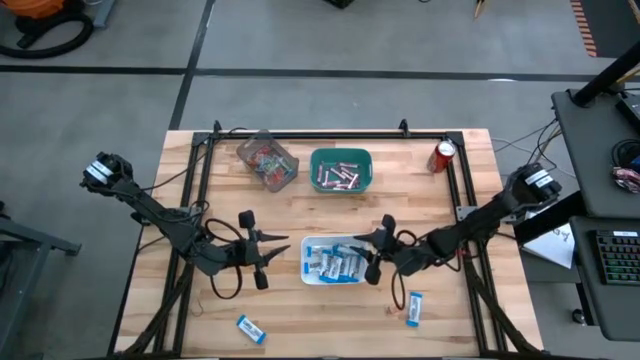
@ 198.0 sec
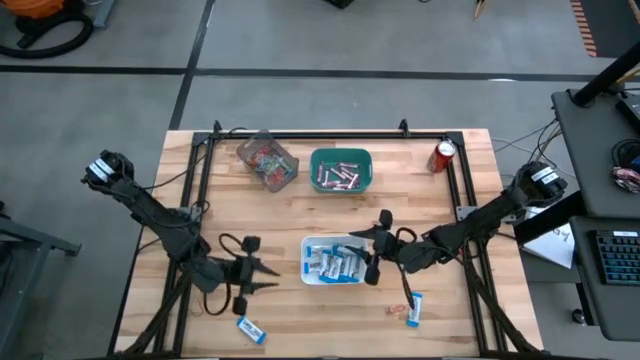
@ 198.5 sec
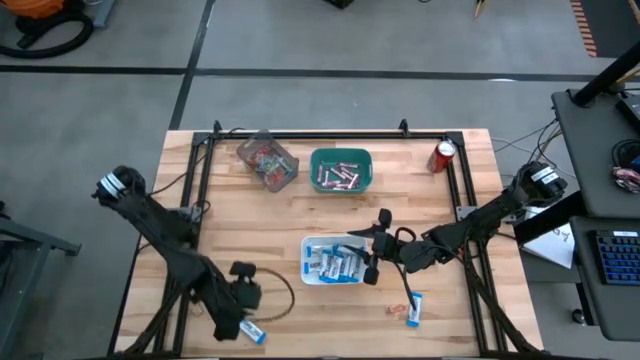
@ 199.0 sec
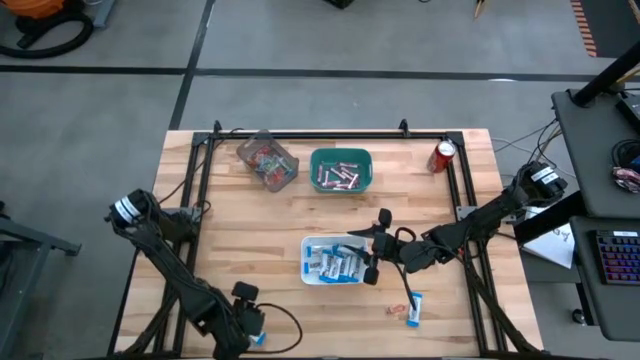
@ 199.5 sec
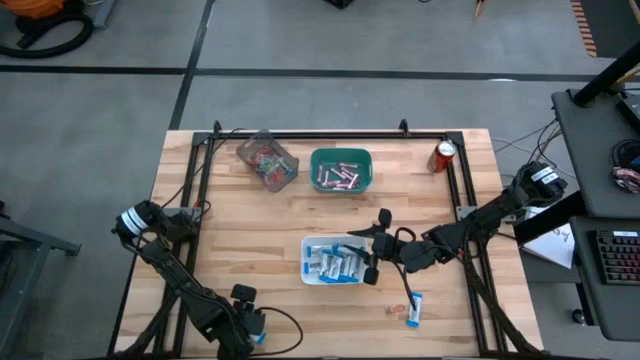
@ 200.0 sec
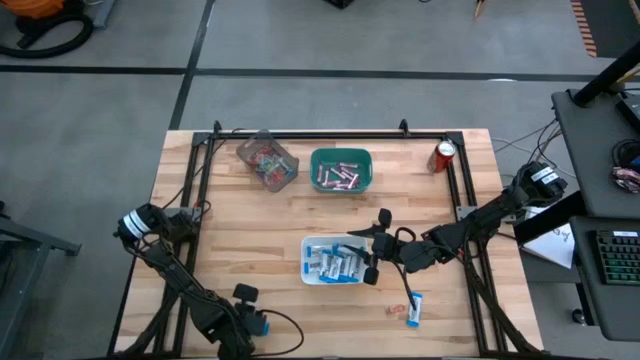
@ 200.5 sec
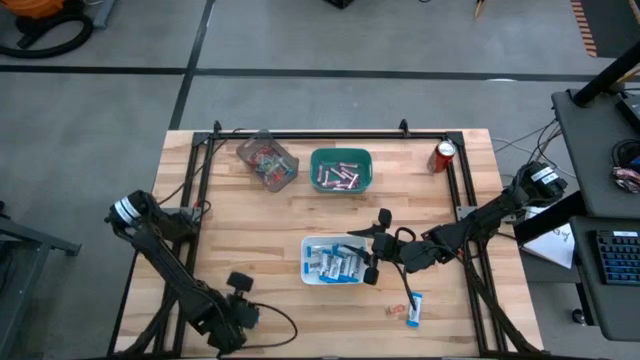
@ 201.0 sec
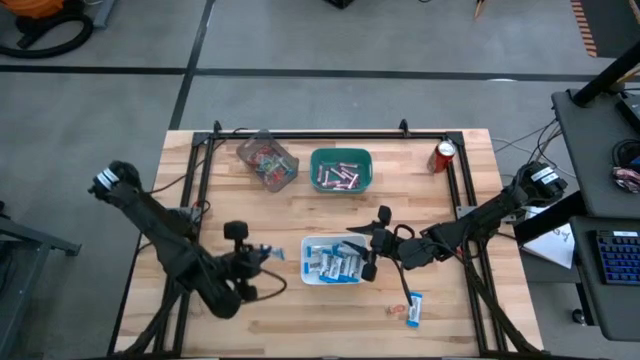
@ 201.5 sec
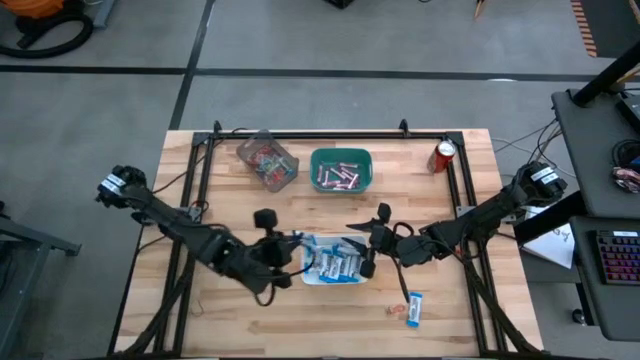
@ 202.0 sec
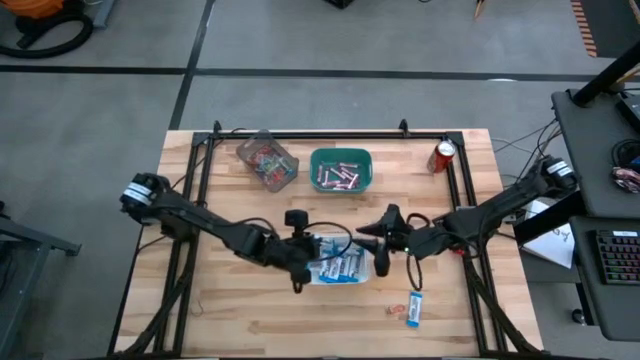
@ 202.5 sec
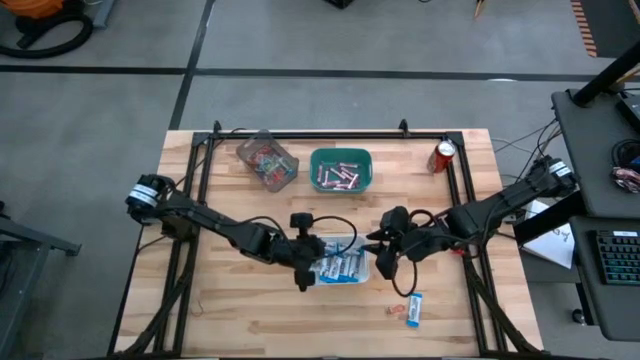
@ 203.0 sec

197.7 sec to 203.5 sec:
Task: Sort candy
Put the white chocolate bar into the white bin

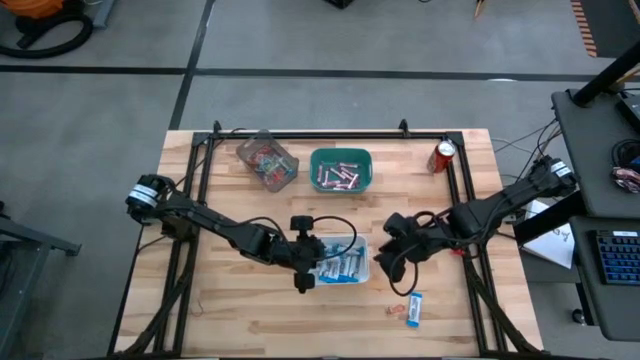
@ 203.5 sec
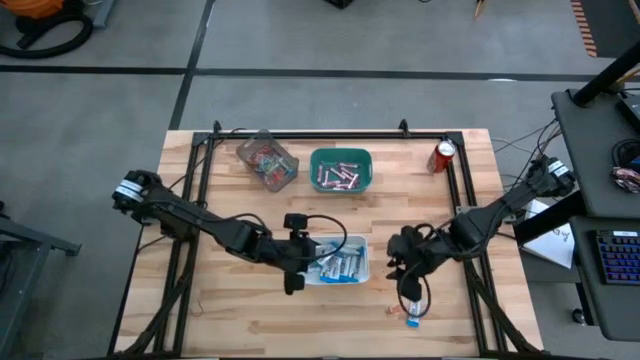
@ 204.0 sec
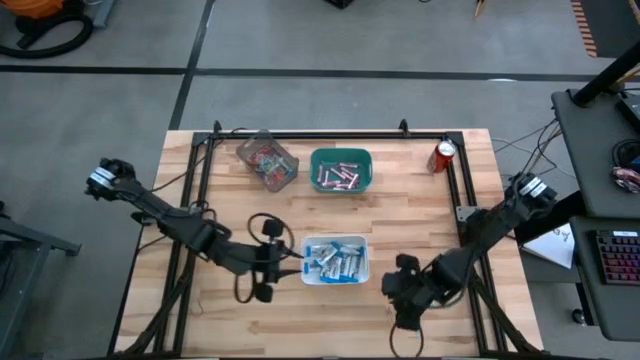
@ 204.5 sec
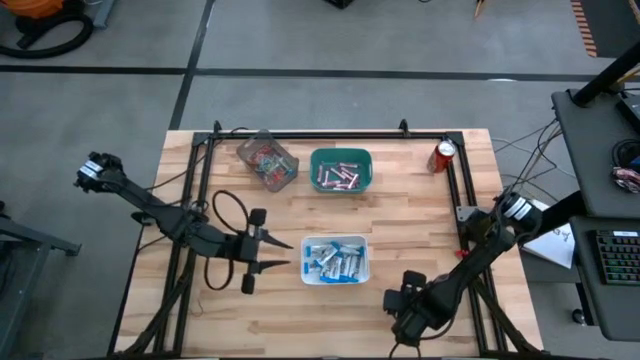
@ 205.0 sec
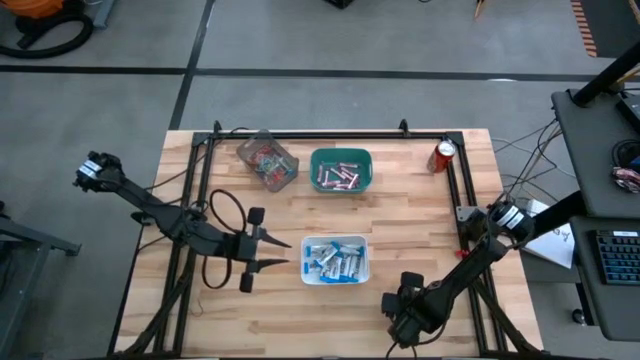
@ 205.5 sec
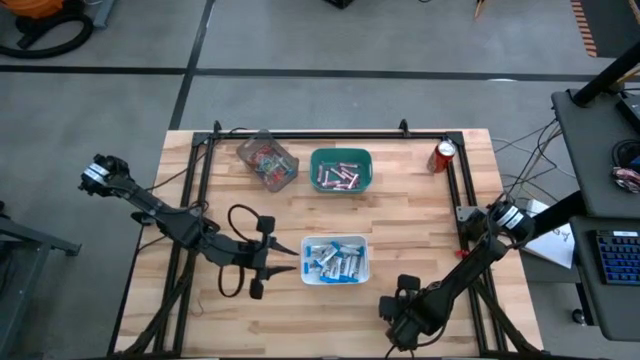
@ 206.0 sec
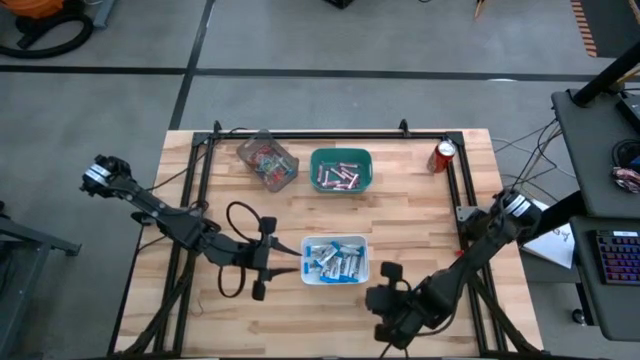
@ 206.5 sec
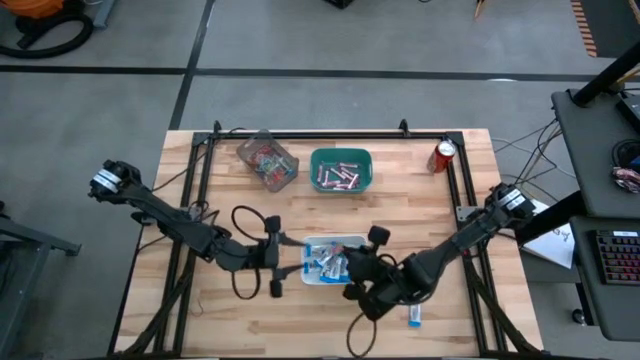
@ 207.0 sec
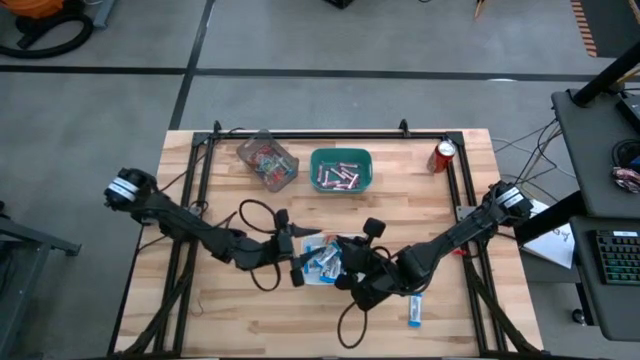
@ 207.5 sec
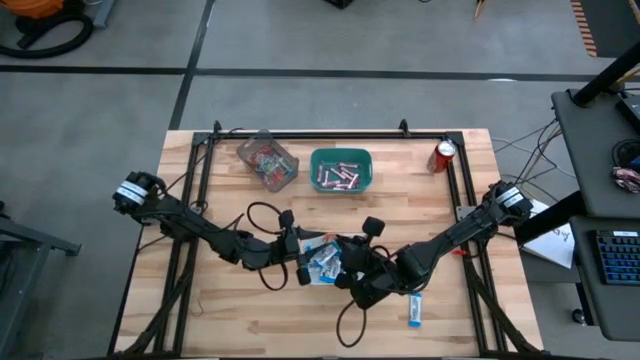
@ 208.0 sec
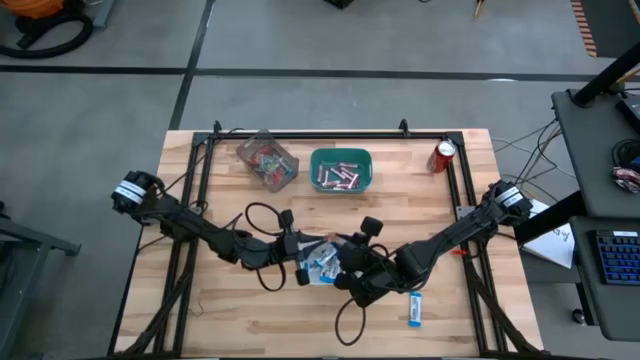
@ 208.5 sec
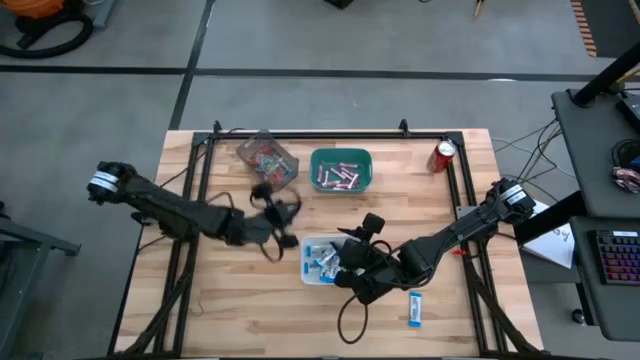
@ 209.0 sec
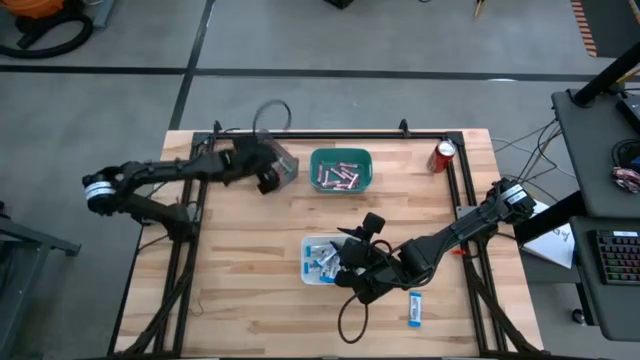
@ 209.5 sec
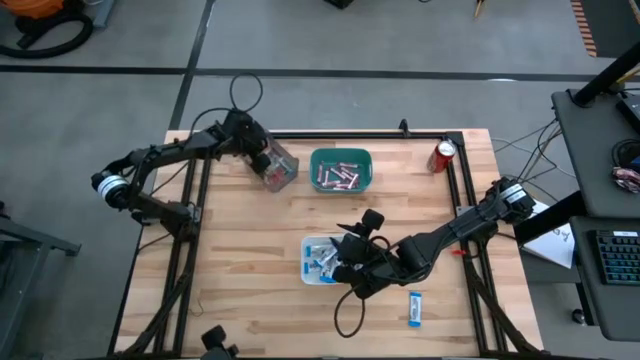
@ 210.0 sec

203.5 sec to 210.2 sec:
Put the orange gummy into the black bin

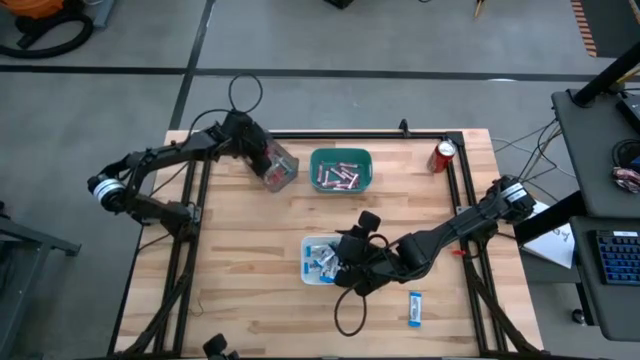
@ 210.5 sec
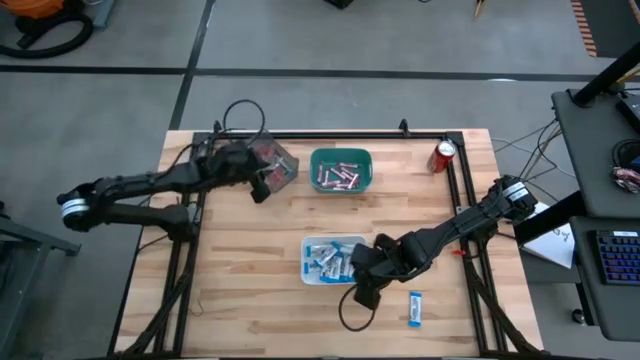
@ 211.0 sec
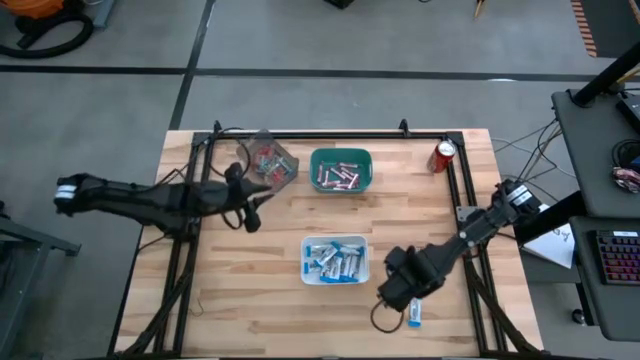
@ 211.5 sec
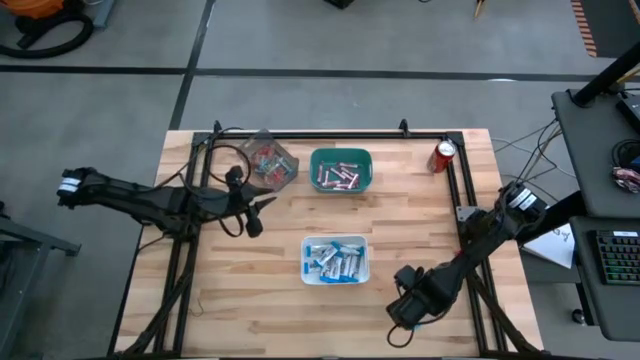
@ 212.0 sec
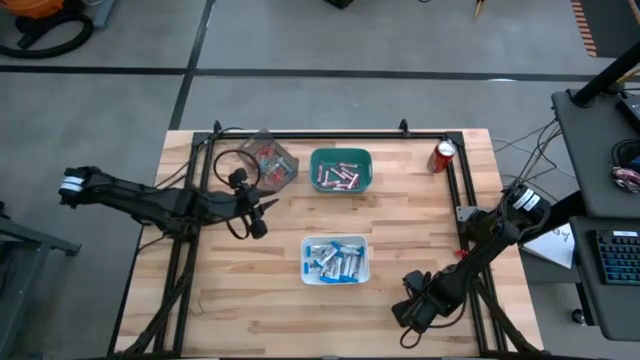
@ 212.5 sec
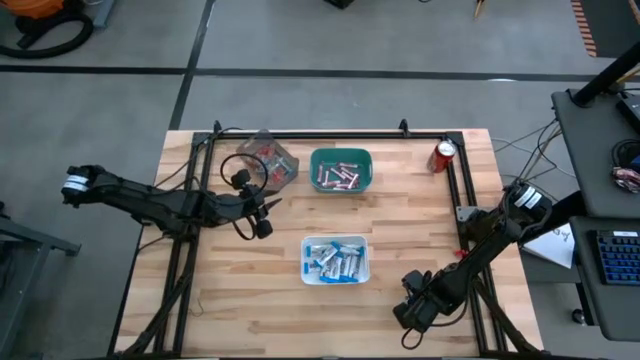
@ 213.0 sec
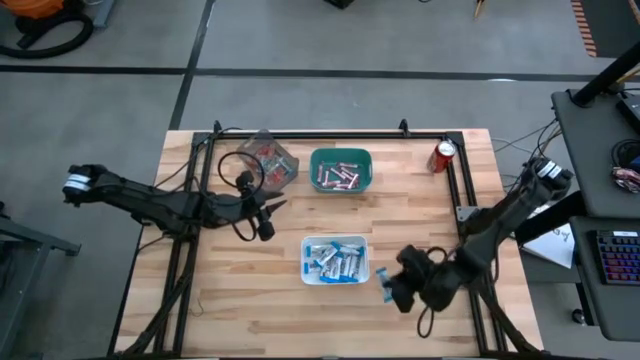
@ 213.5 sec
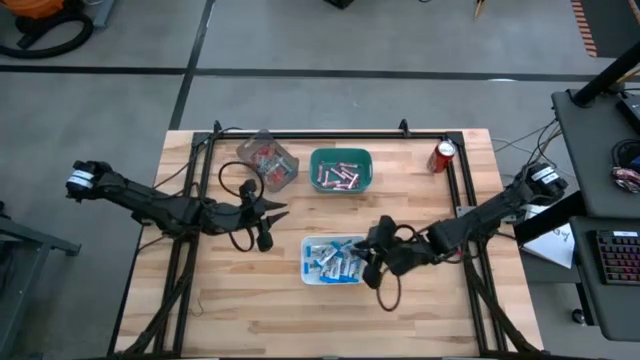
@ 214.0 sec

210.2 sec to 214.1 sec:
Put the white chocolate bar into the white bin

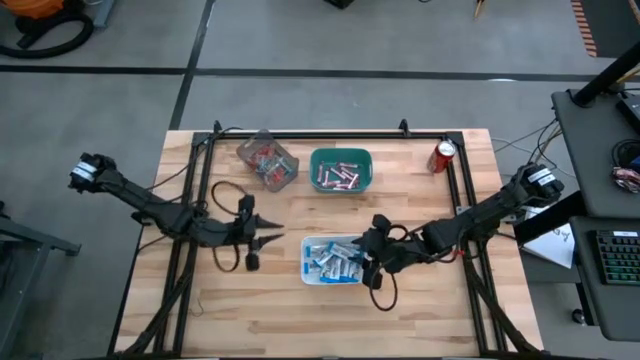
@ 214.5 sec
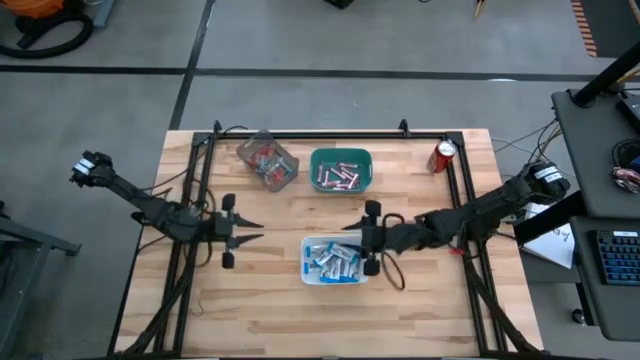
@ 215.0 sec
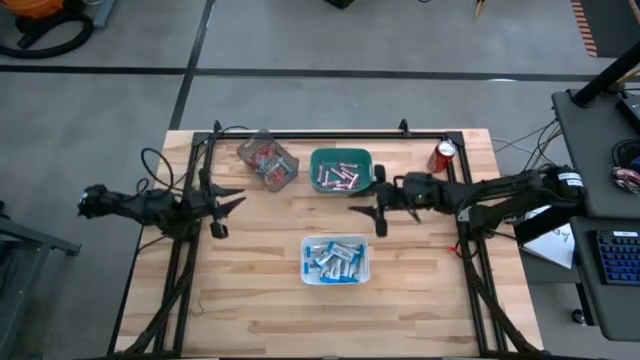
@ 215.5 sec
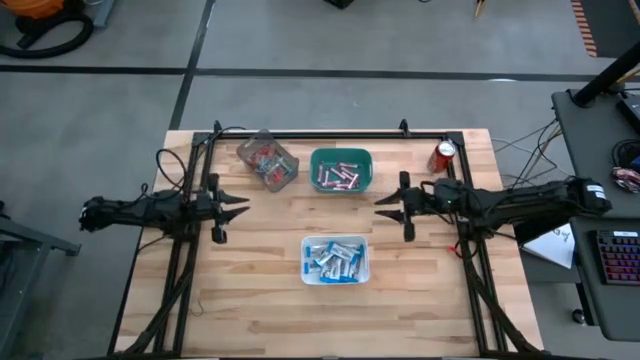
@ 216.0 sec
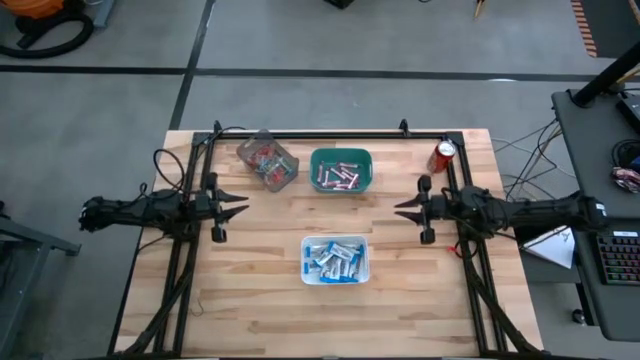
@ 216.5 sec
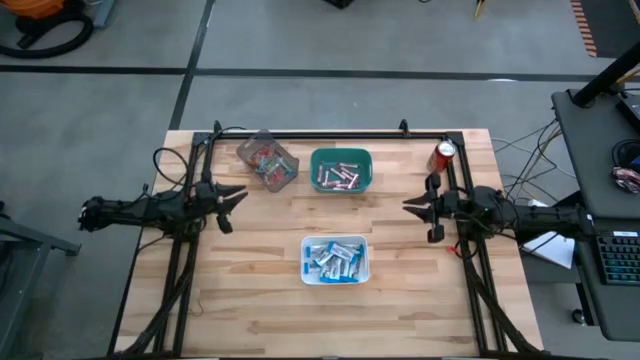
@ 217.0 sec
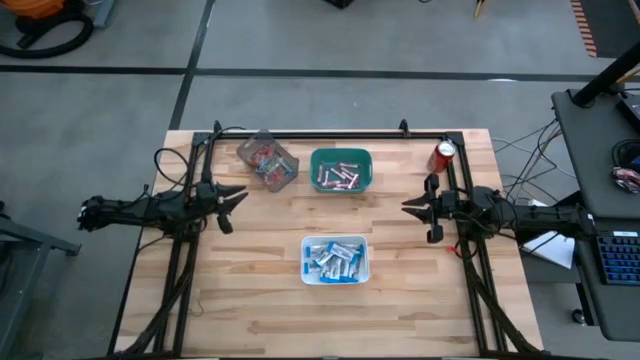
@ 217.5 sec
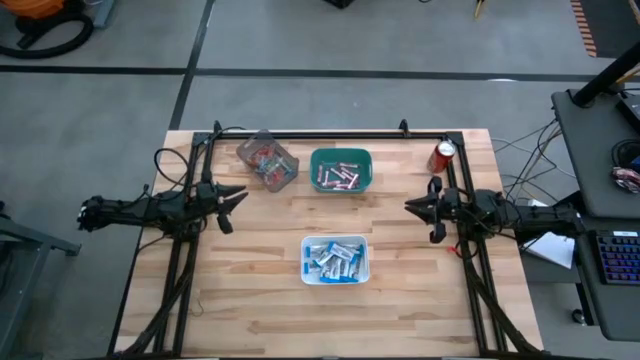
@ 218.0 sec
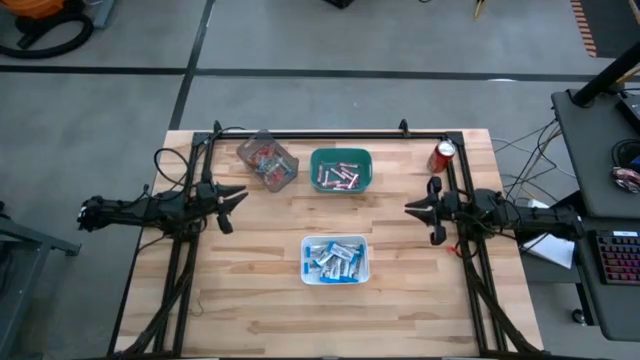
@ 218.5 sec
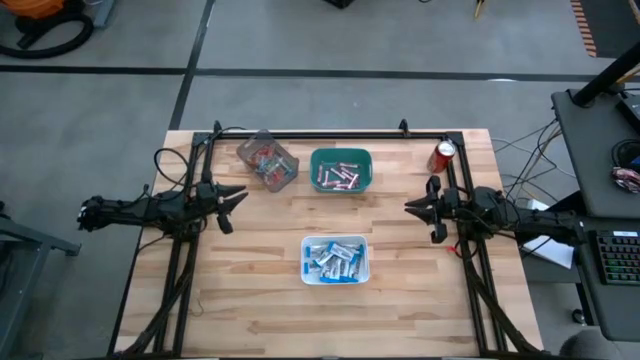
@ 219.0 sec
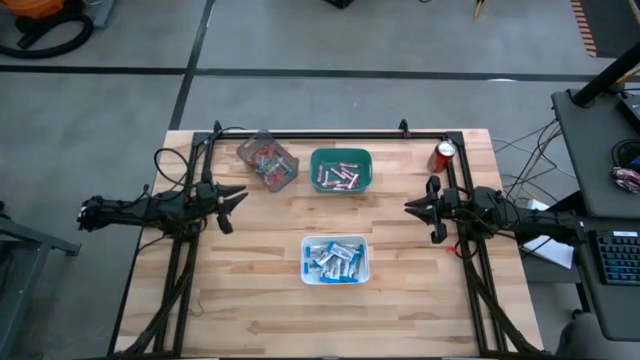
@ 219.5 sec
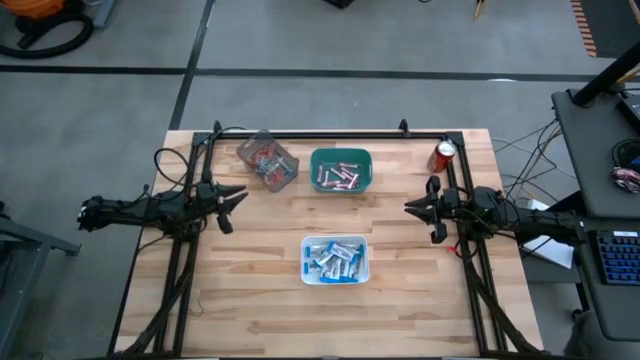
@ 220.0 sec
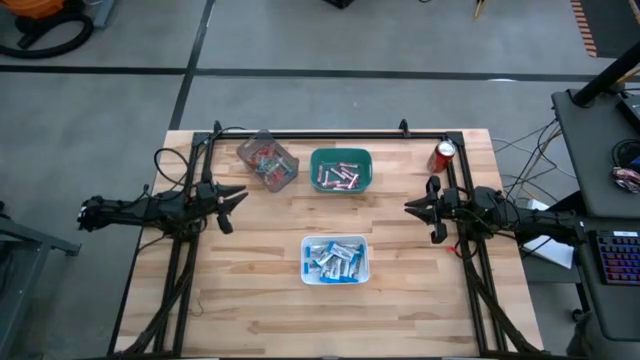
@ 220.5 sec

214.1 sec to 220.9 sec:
Return to Home Position
